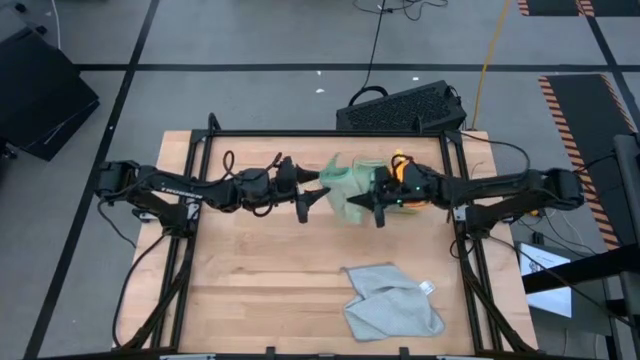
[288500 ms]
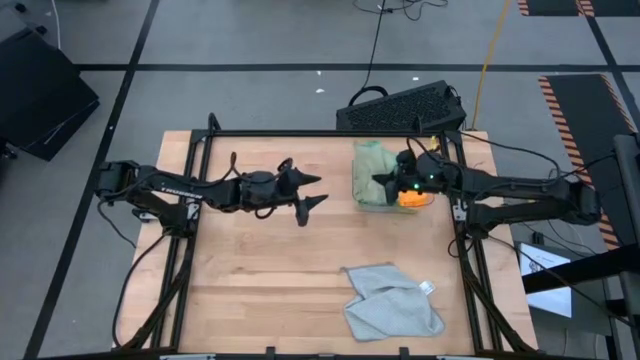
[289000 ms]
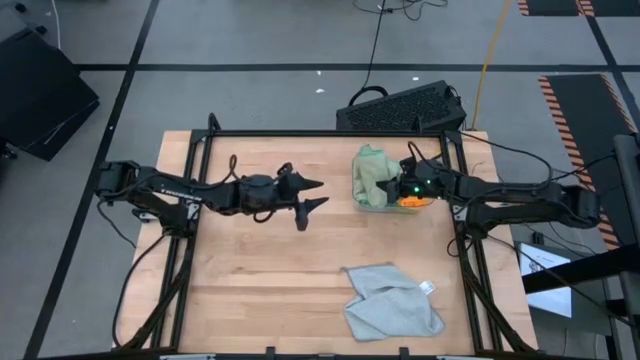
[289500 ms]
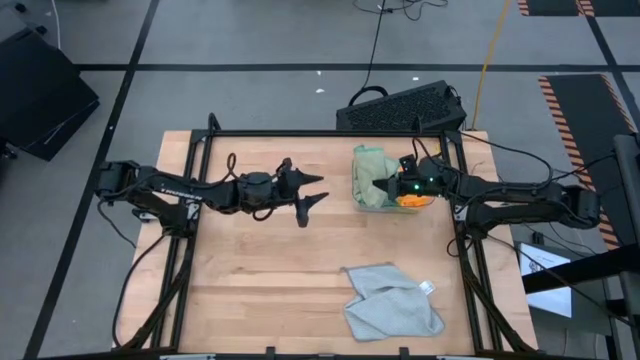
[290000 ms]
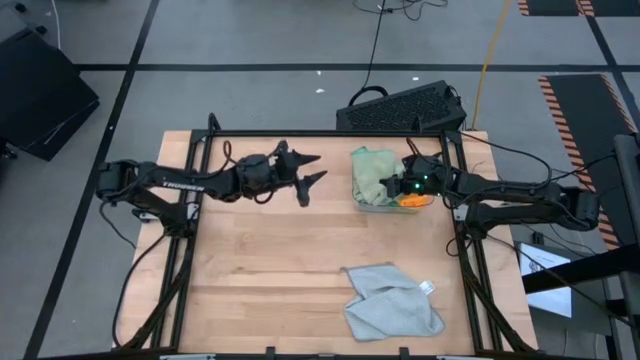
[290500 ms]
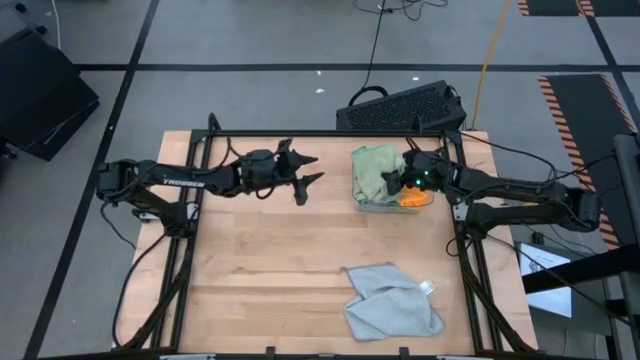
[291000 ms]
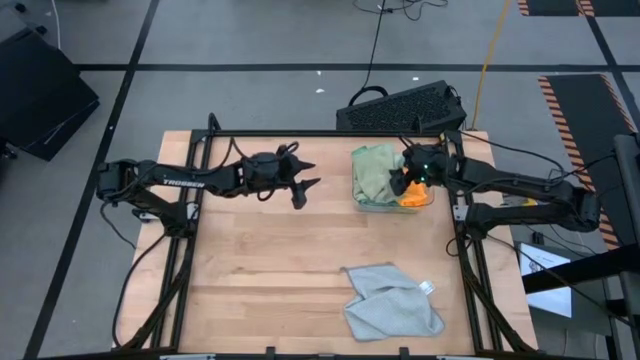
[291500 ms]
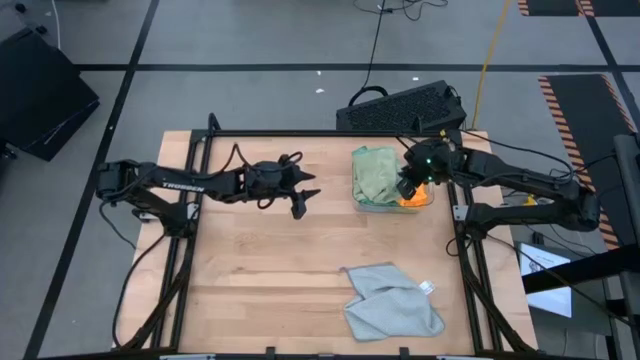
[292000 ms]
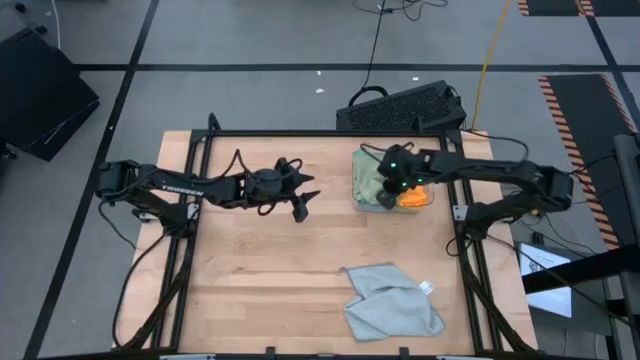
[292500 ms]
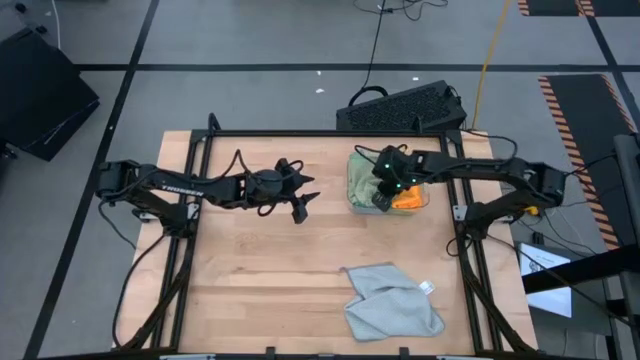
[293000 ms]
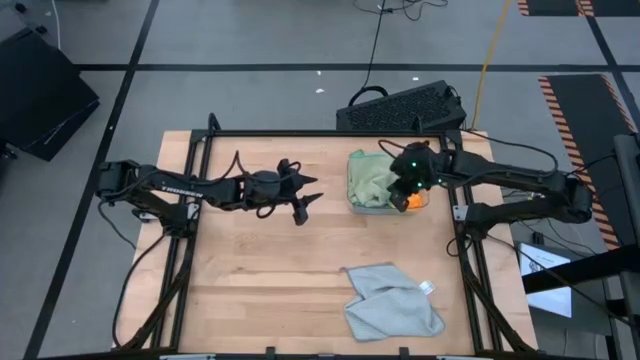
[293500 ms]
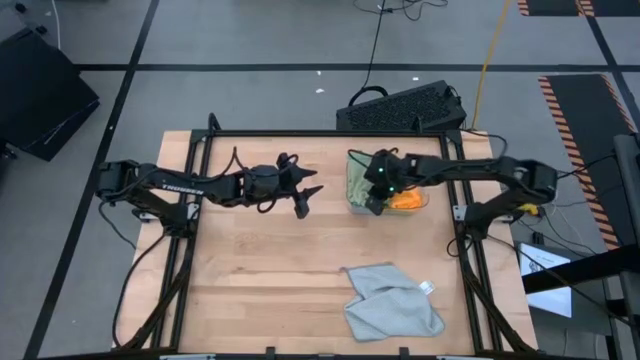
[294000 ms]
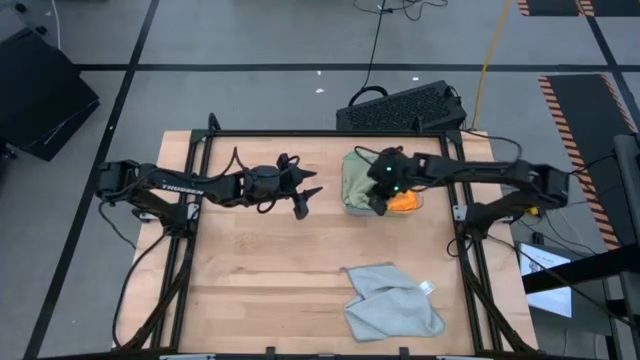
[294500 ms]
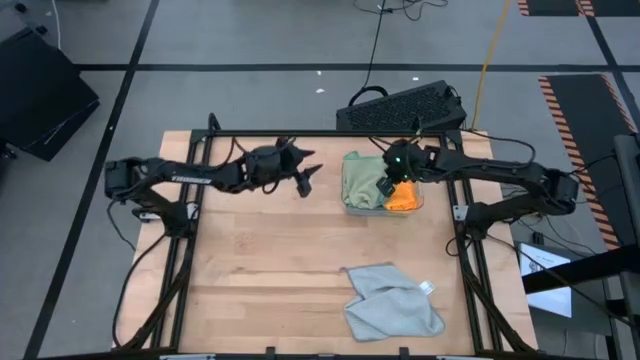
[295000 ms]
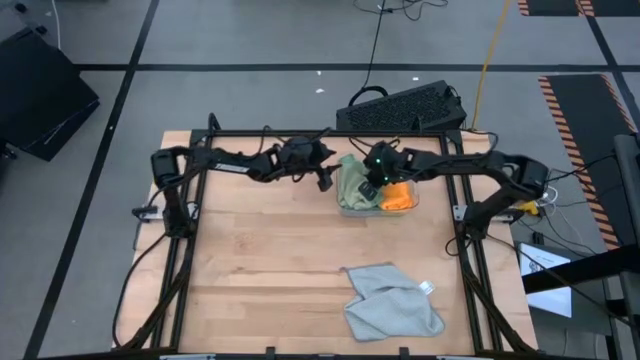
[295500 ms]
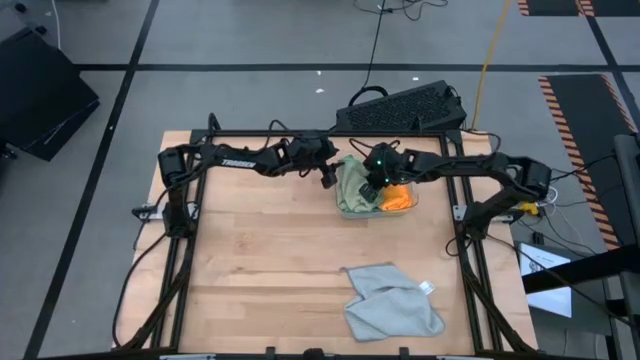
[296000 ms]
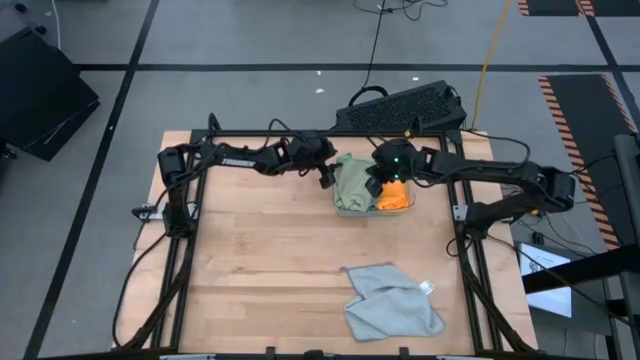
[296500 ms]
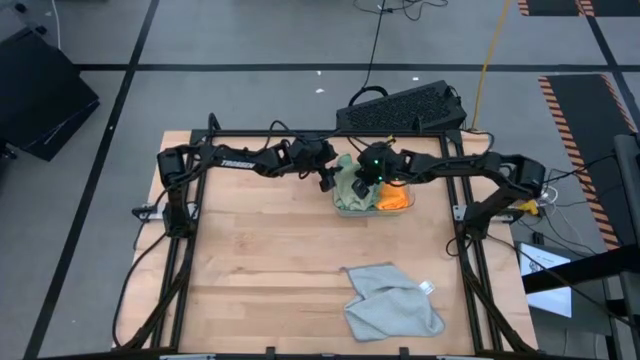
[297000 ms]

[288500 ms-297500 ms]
Task: Fold microfiber towels
Put the folded light green microfiber cloth into the transparent bin

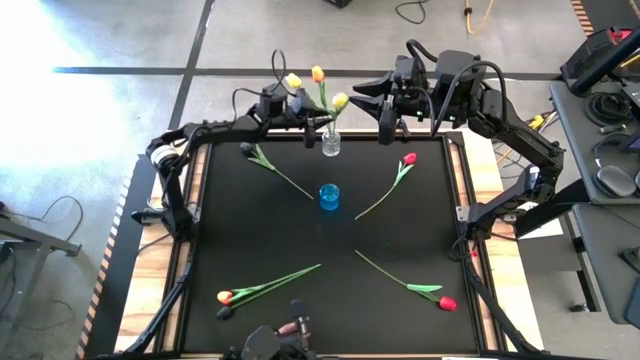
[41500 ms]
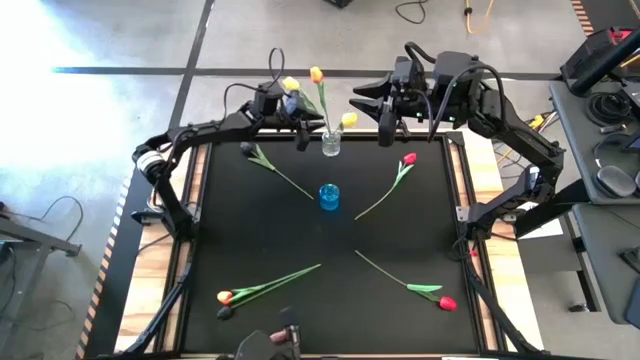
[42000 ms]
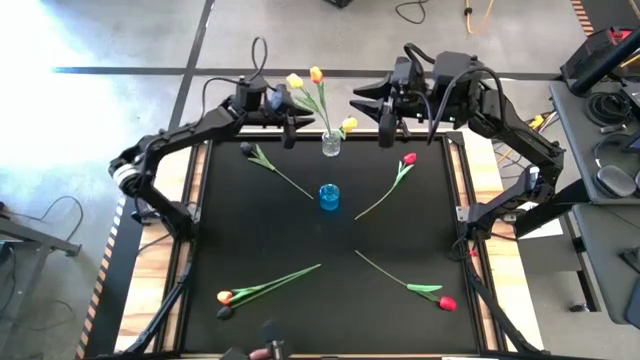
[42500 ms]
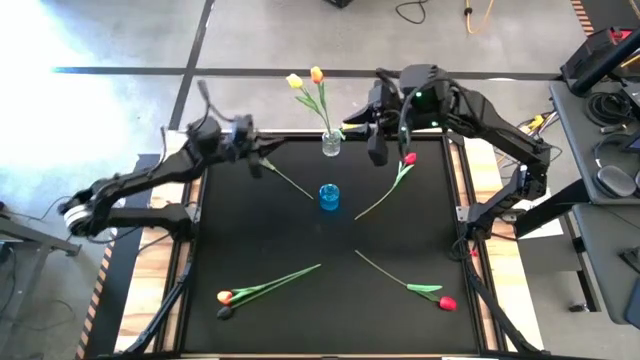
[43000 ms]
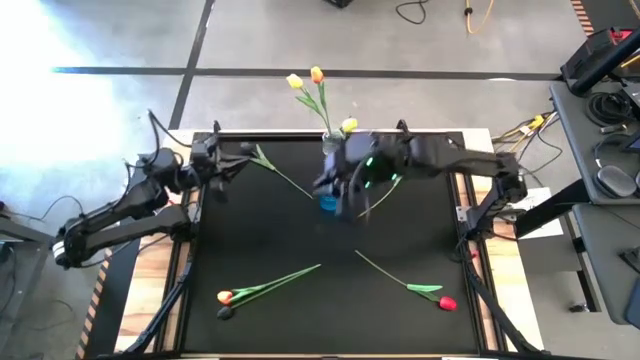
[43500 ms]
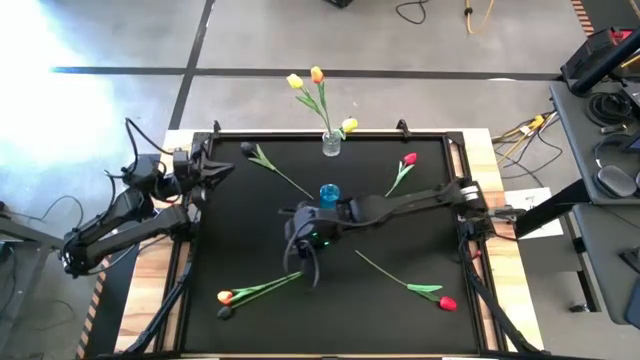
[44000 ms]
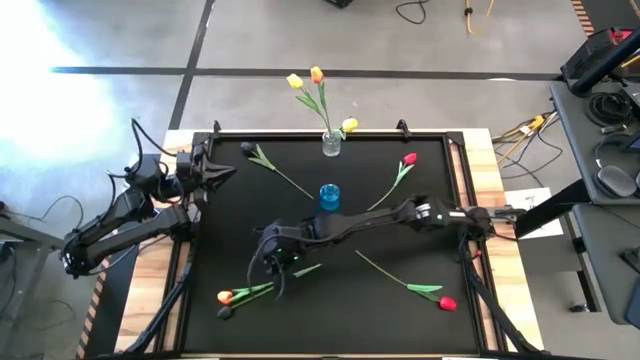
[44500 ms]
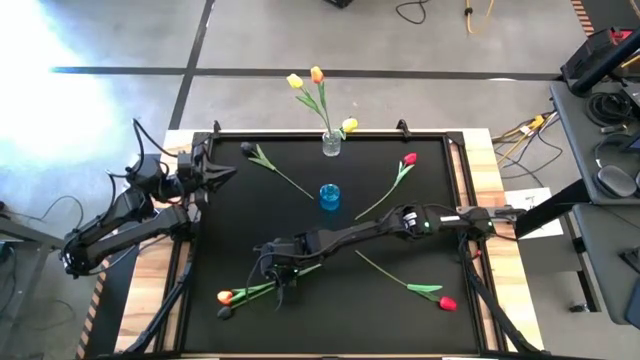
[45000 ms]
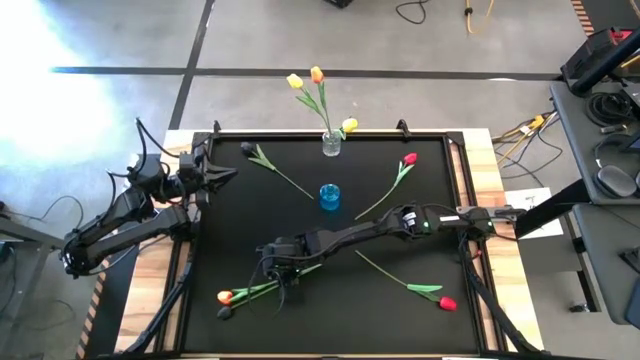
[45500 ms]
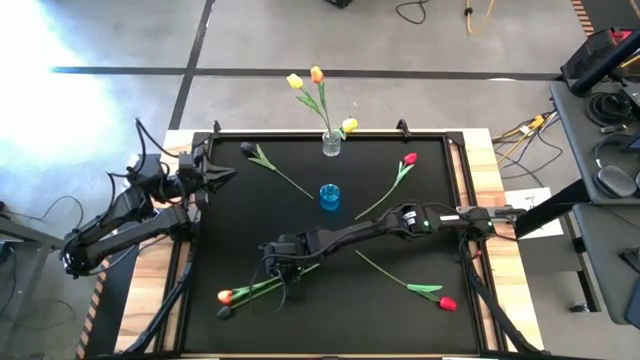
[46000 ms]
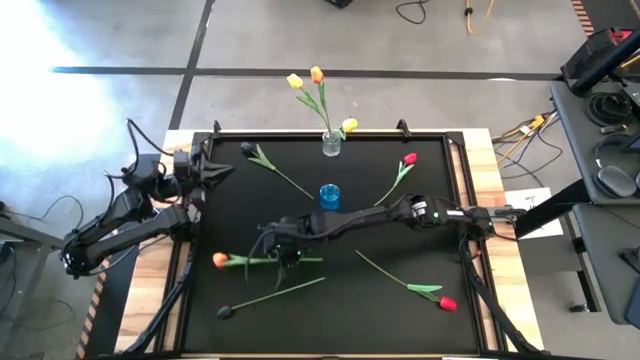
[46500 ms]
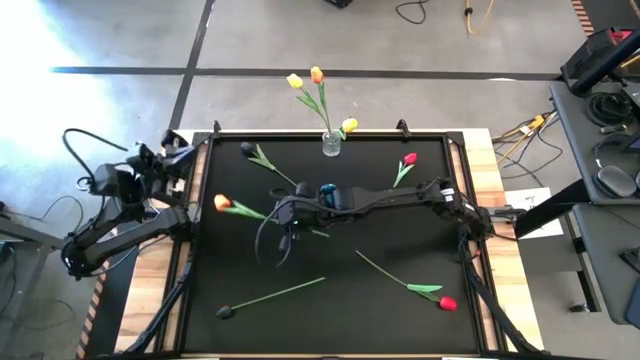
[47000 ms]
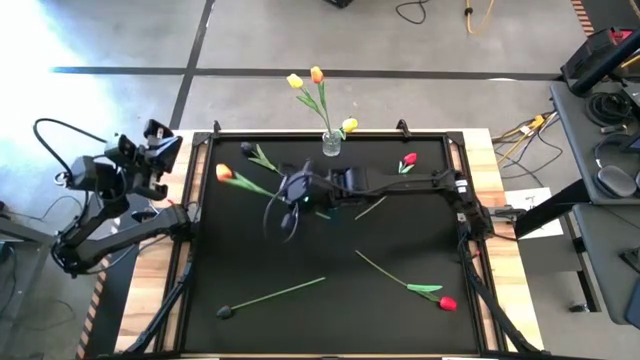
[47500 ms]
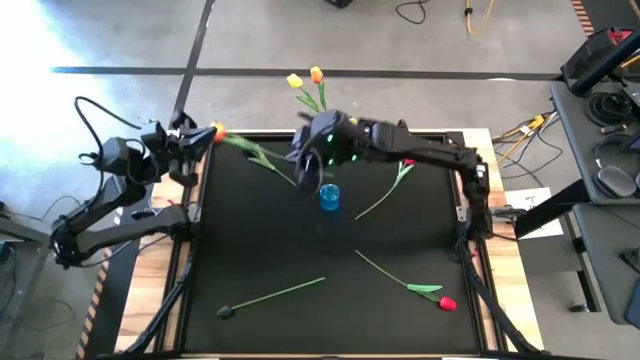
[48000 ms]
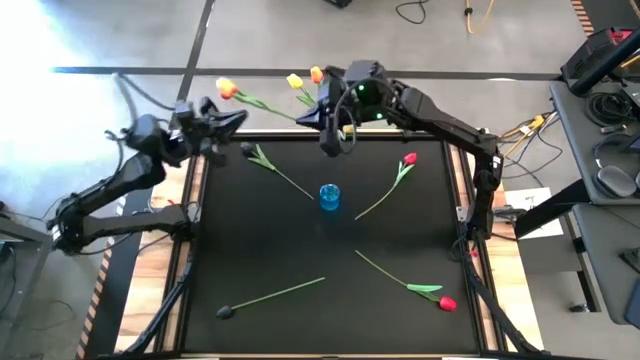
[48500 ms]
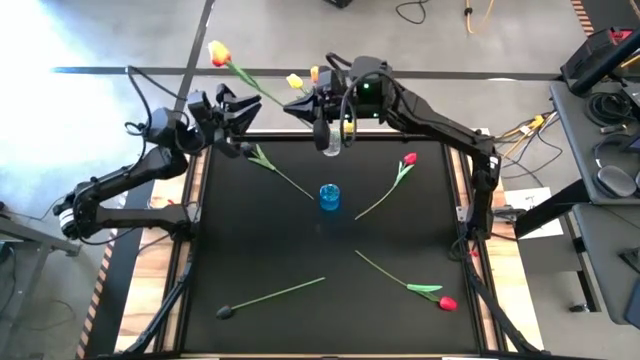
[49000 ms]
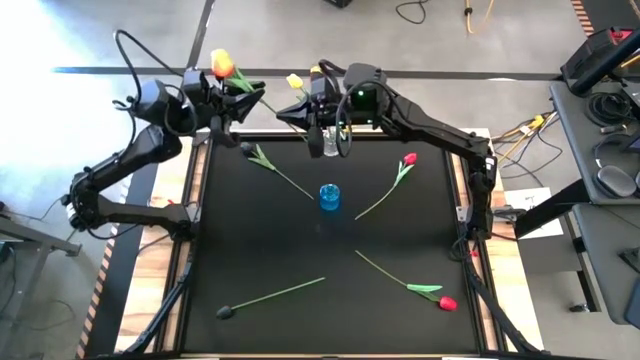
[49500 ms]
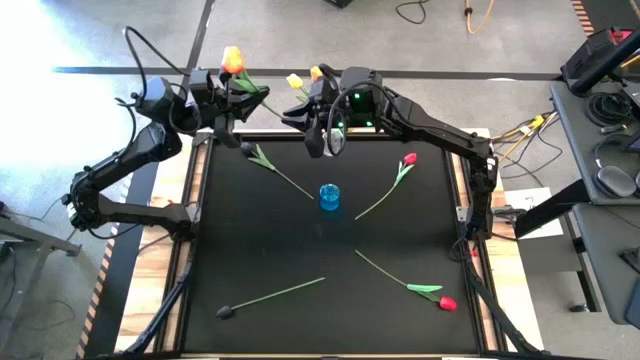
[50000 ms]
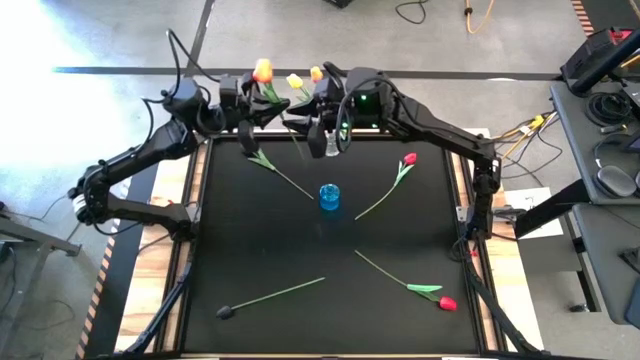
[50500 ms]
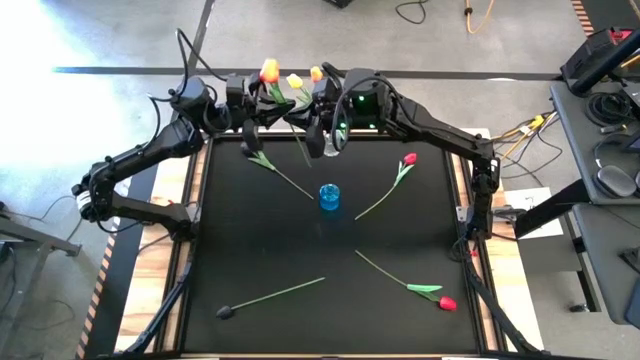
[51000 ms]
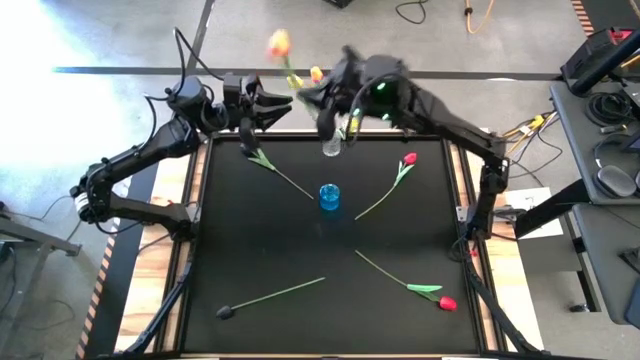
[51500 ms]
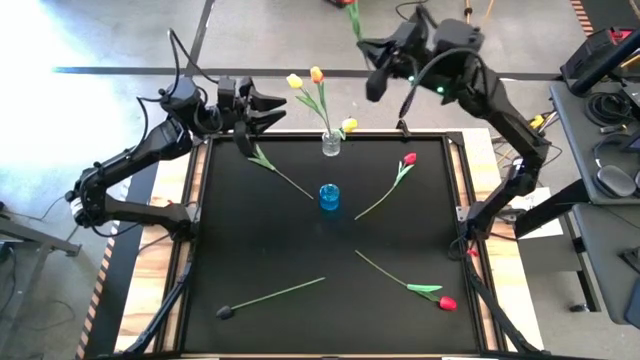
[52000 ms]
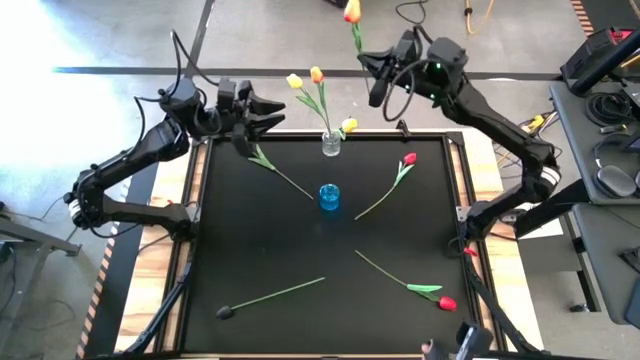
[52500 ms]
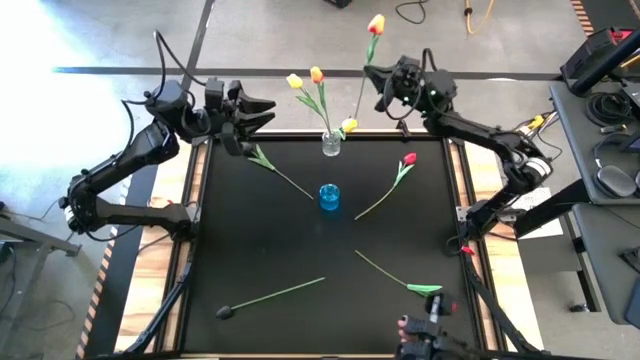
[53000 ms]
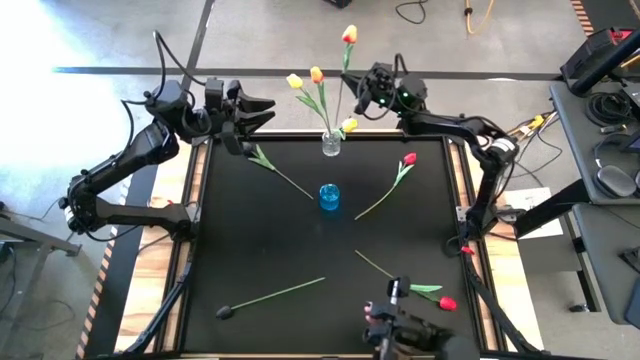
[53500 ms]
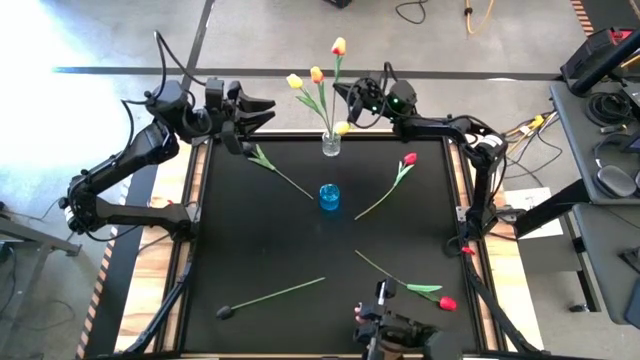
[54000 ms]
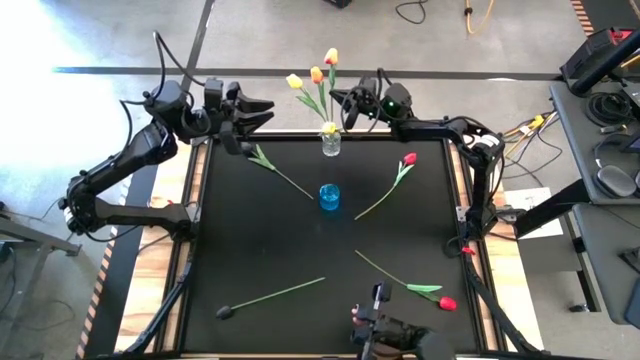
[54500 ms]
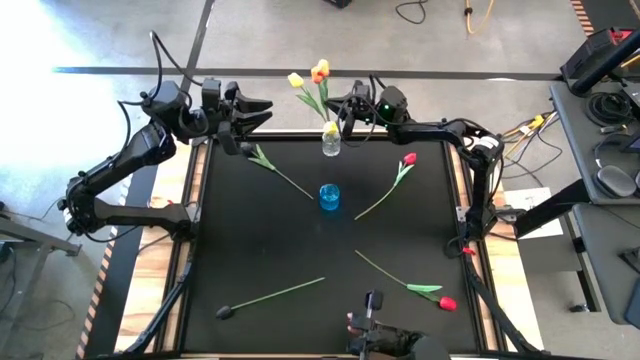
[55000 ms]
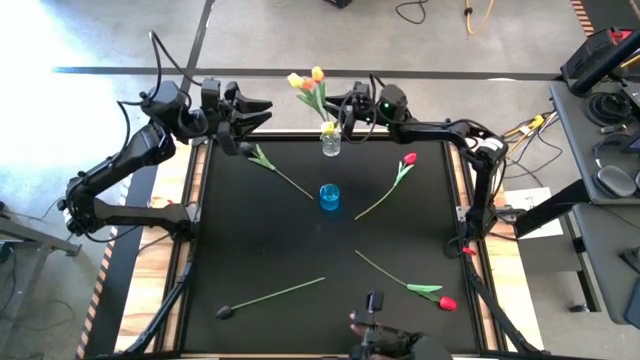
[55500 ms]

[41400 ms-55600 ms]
Task: Sort flowers into vase by color
Put the orange tulip flower into the transparent vase
